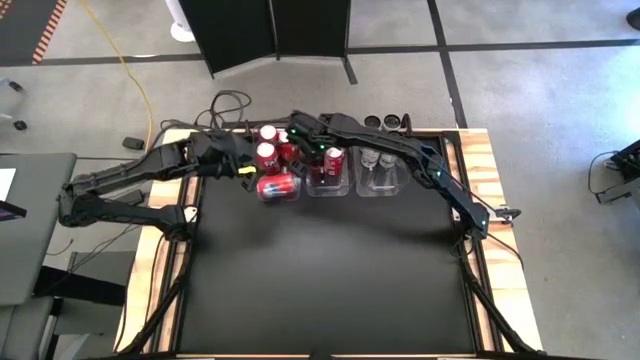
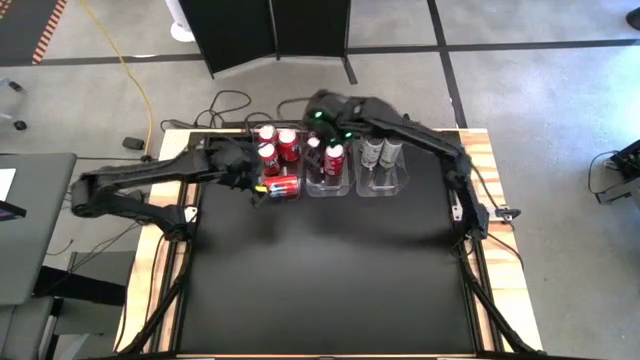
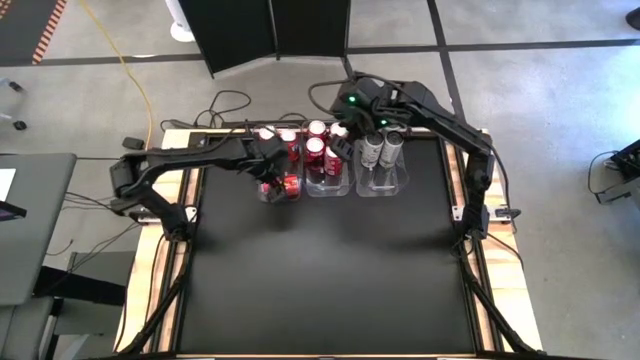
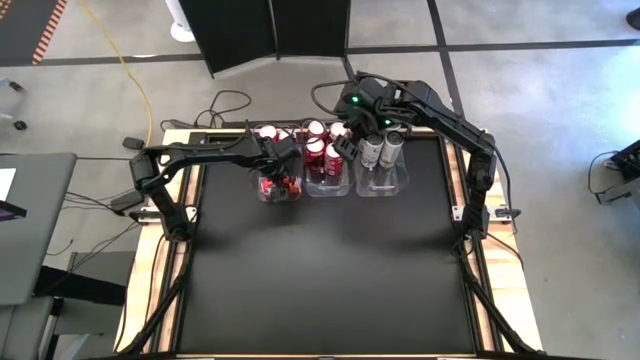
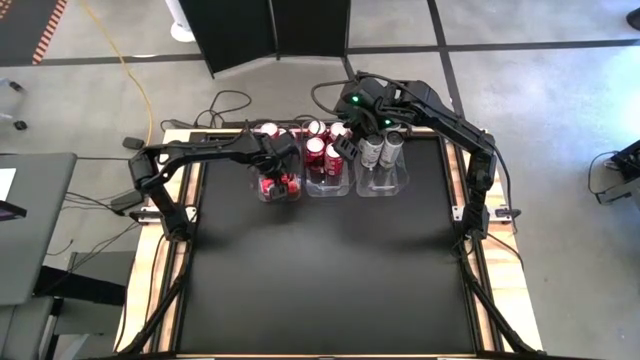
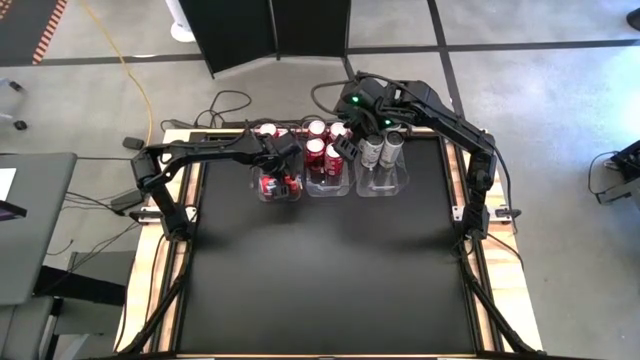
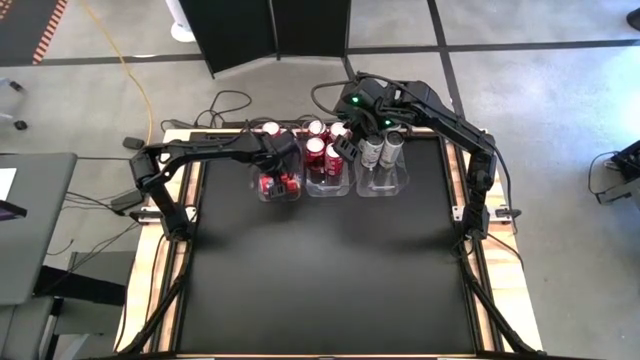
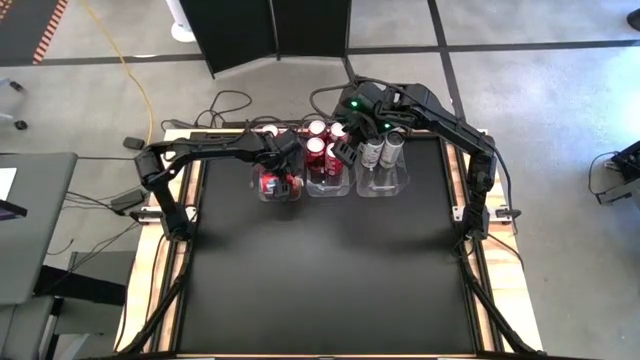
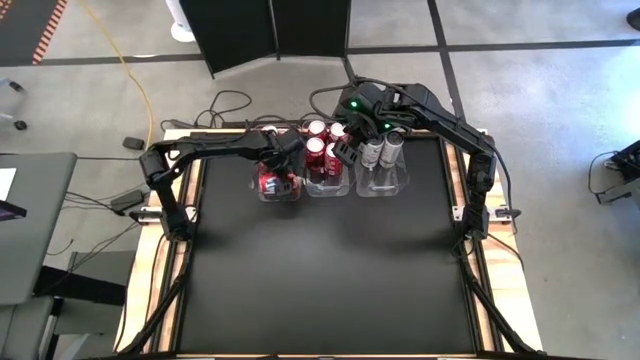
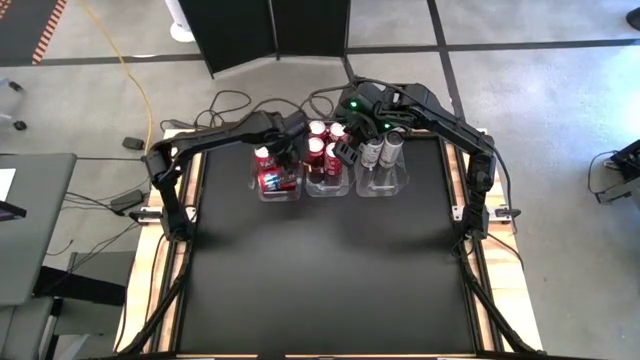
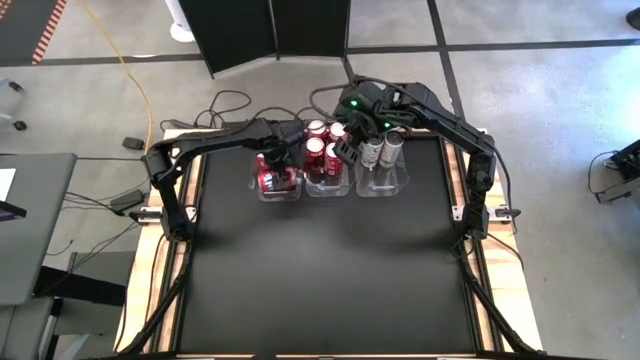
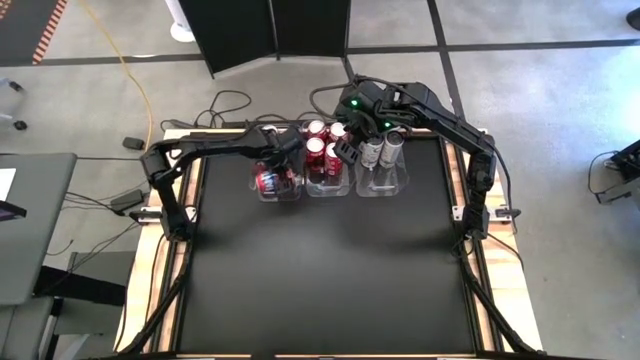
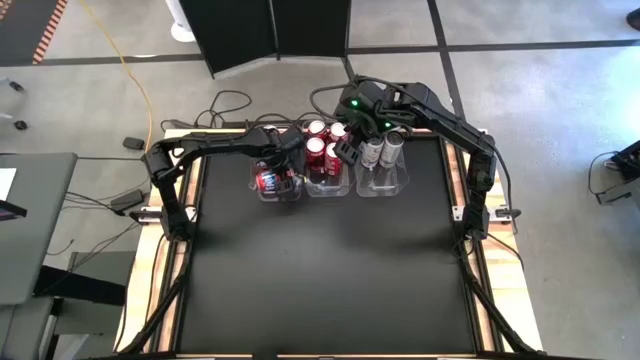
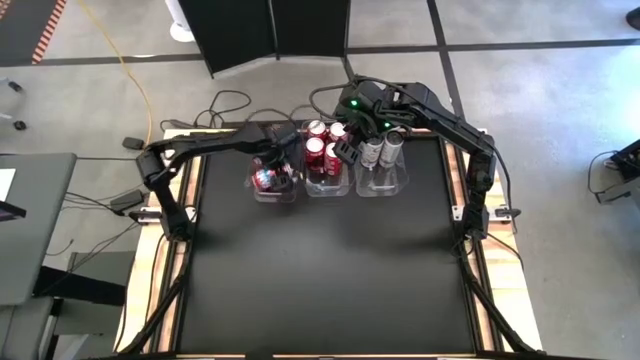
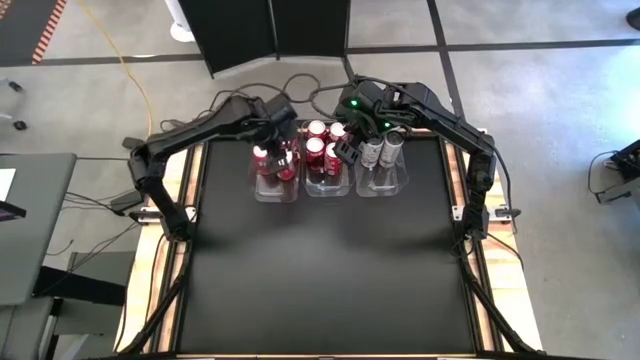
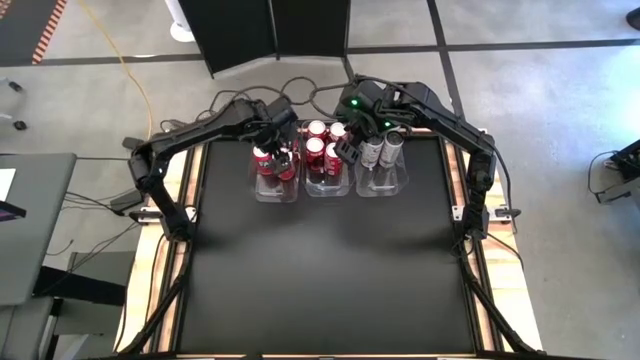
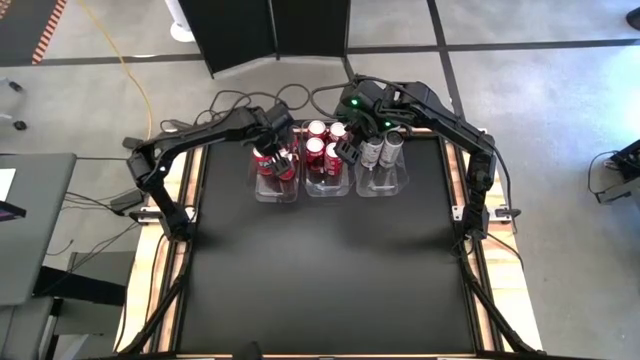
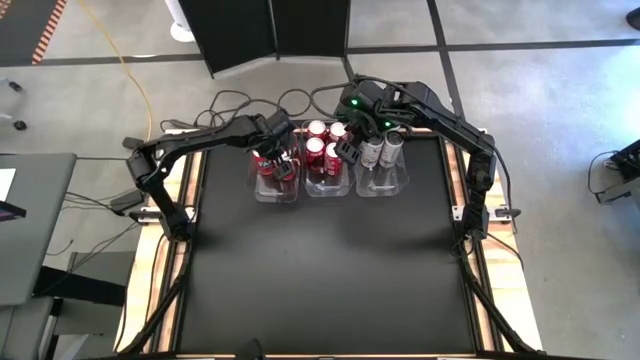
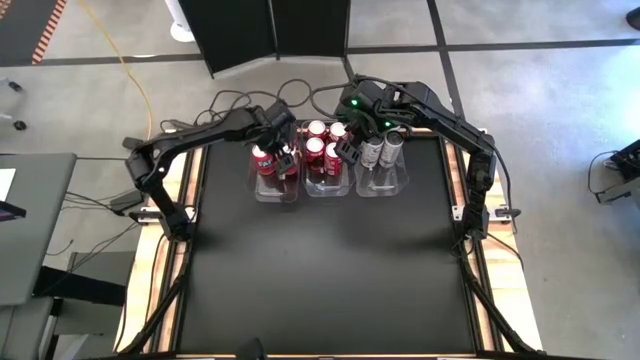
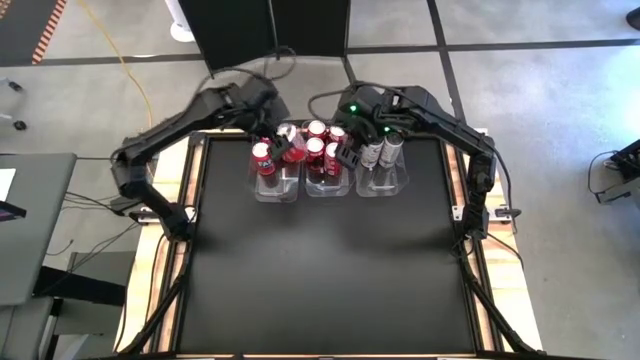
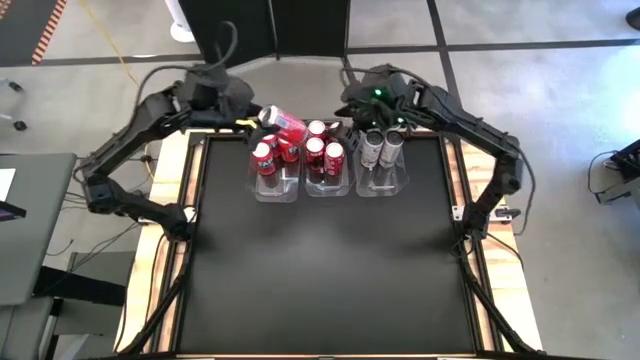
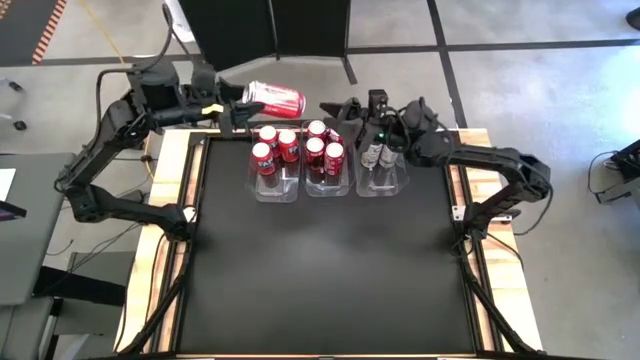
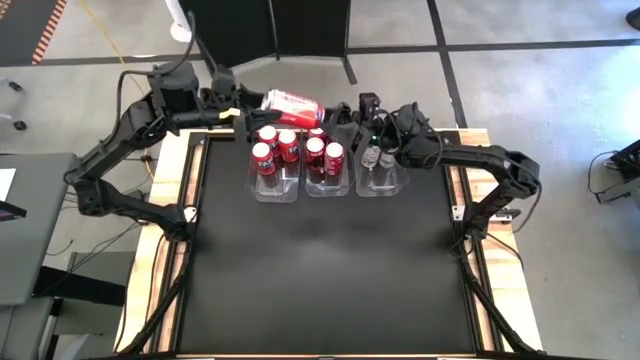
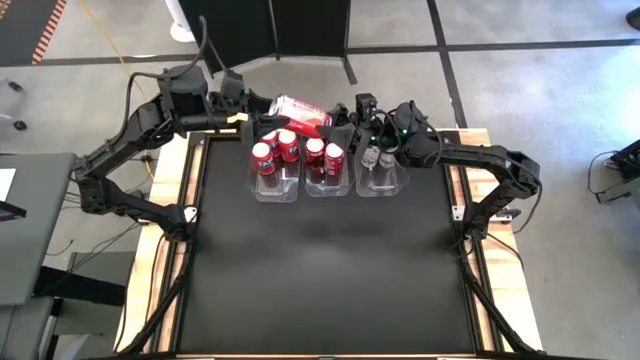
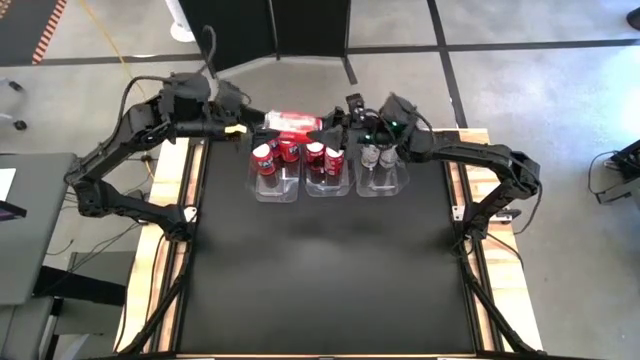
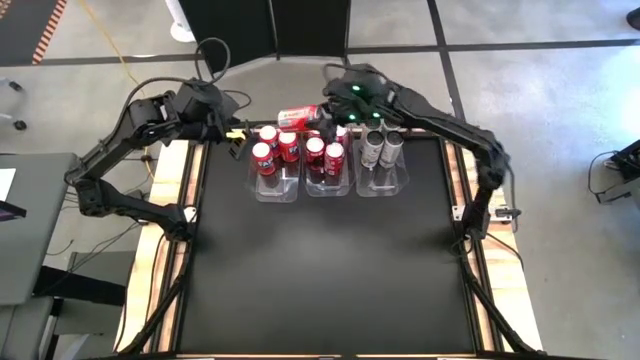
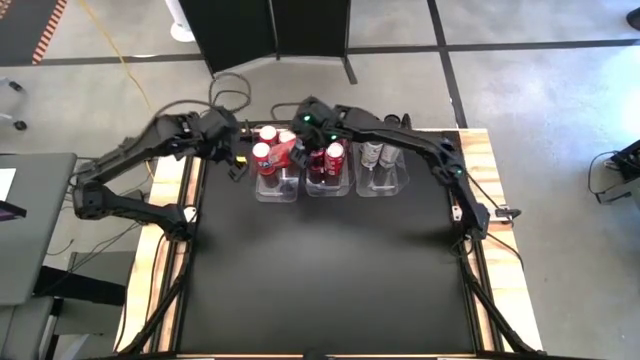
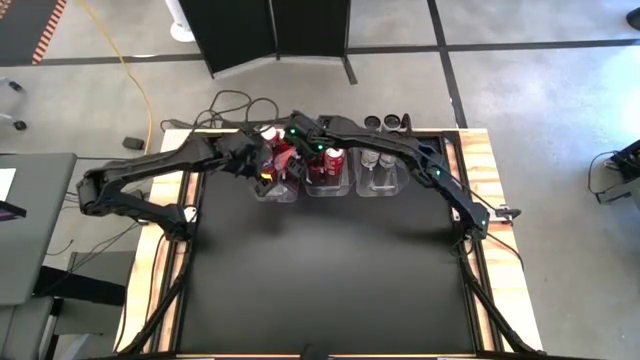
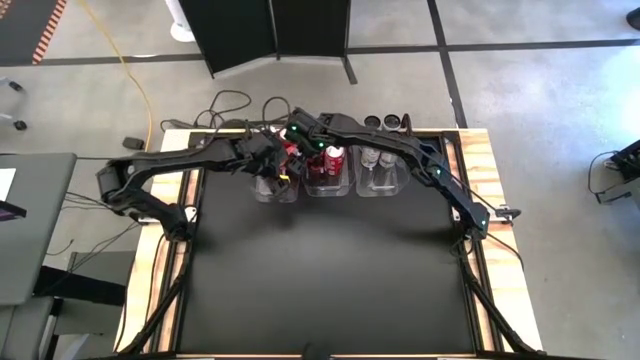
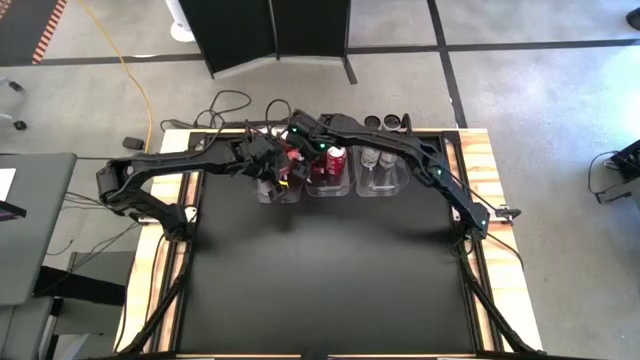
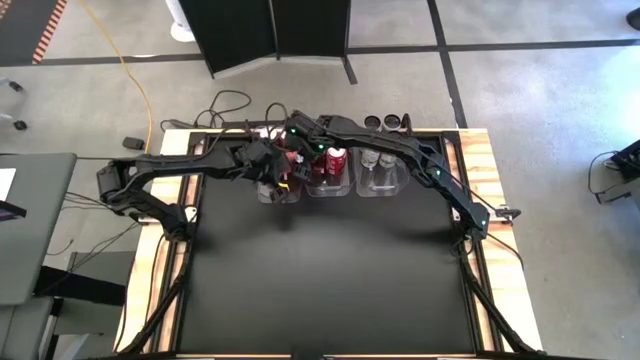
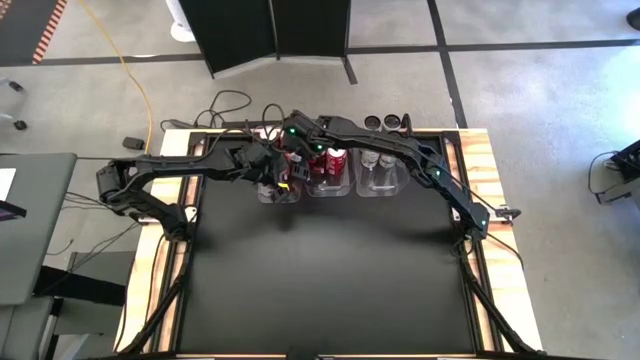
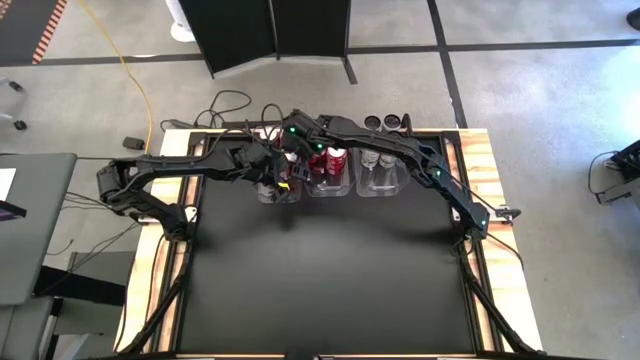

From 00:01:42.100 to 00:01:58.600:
Task: Sort soda cans
Put the red soda can into the left transparent bin

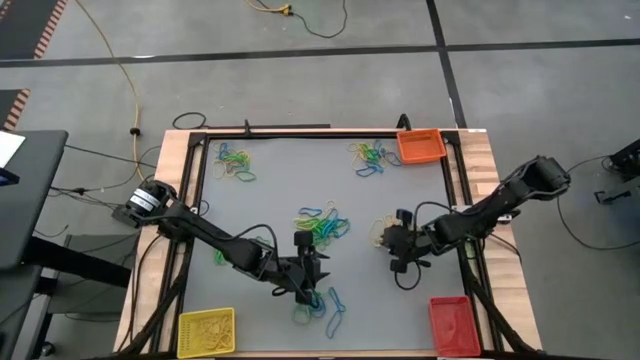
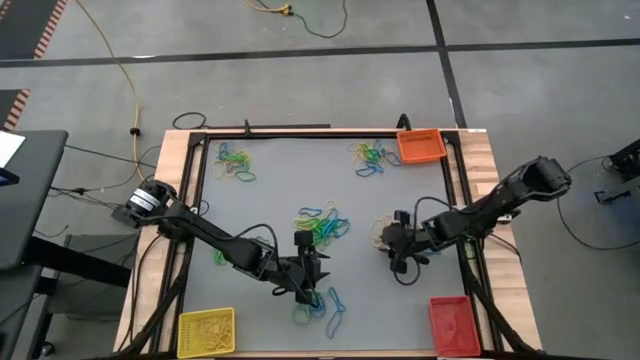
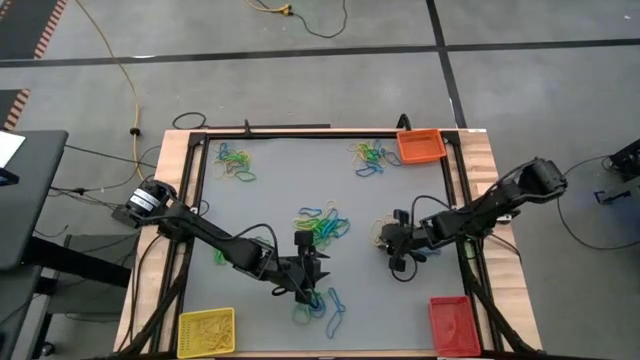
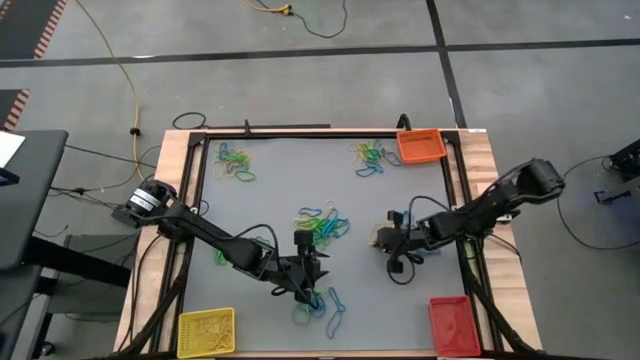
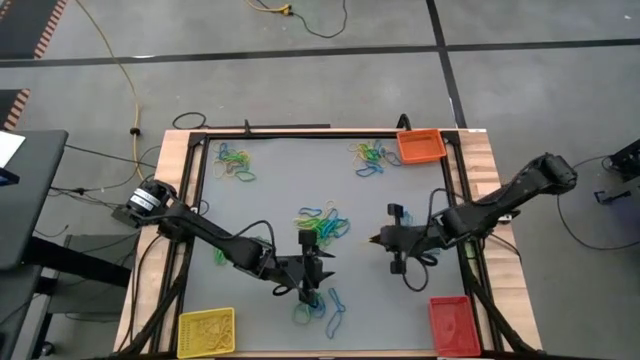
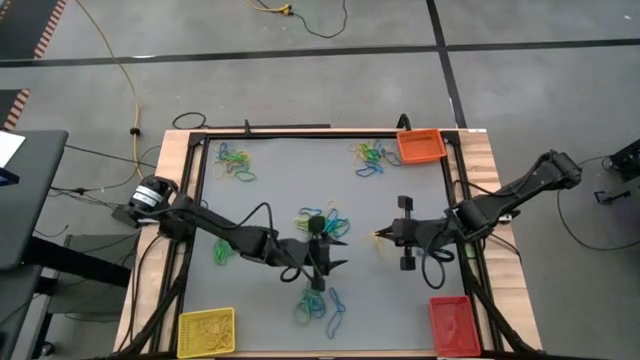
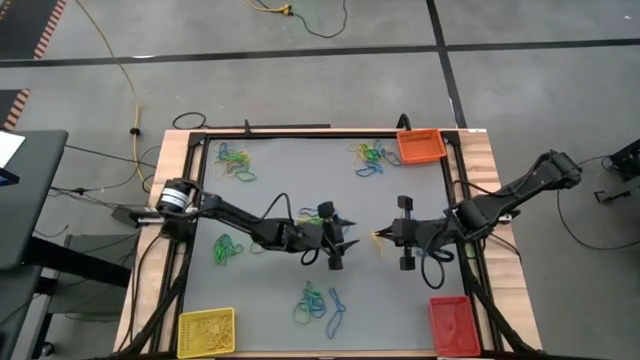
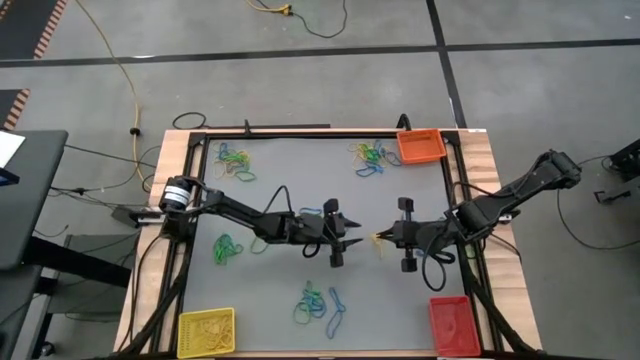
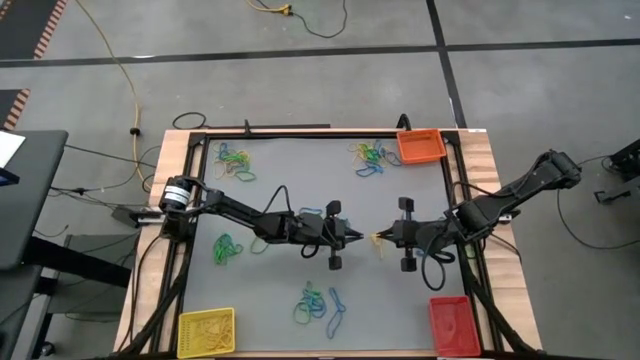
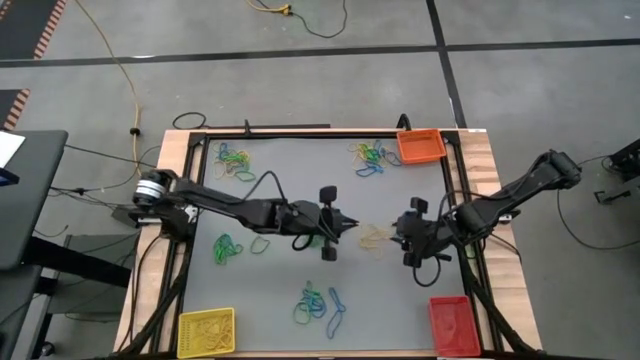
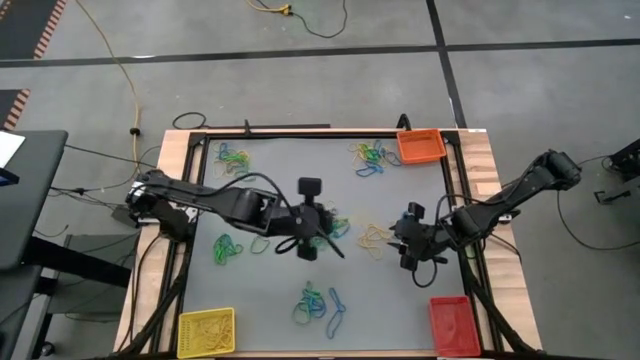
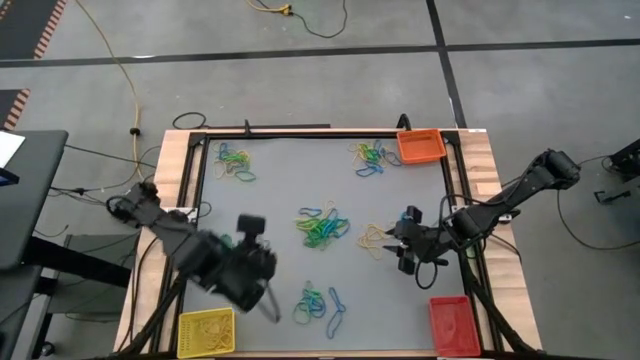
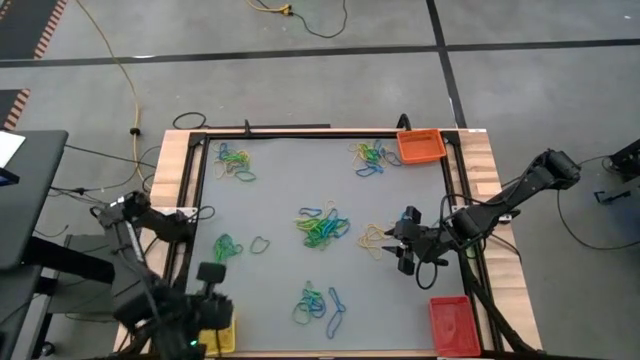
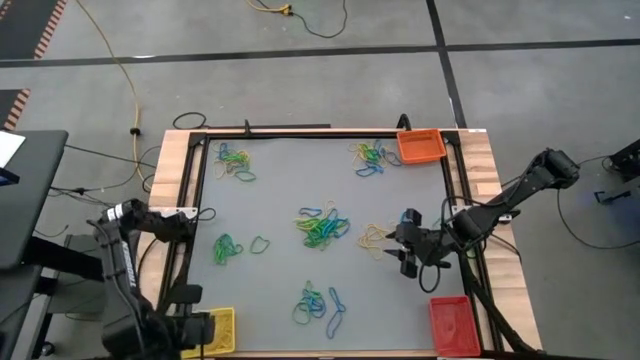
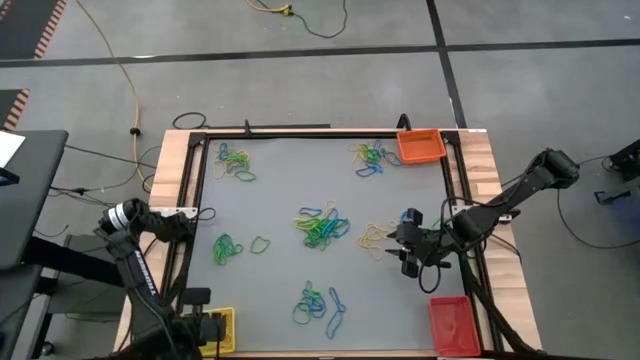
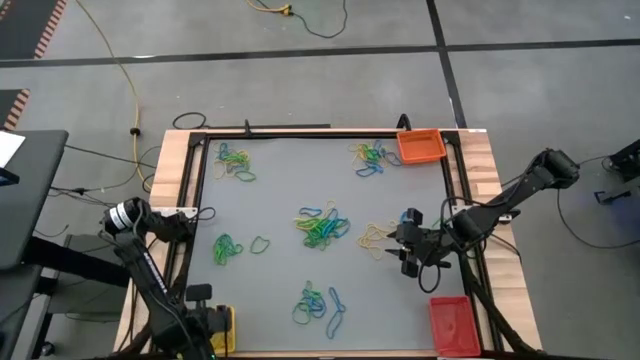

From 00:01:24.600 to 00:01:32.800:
Task: Sort rubber bands into baskets
Put the yellow rubber band into the yellow bin
